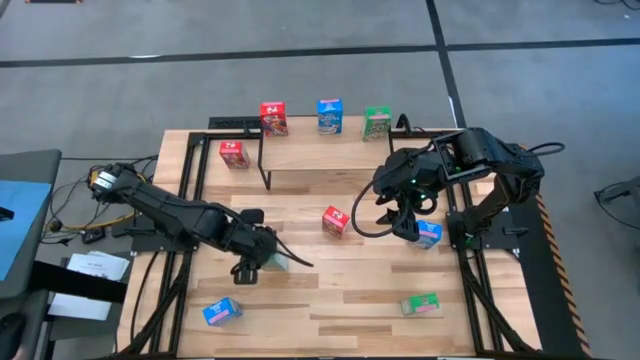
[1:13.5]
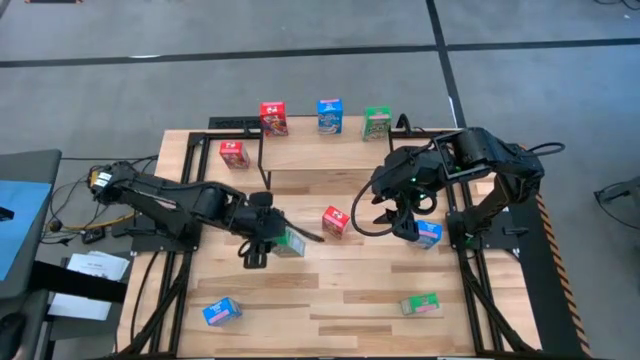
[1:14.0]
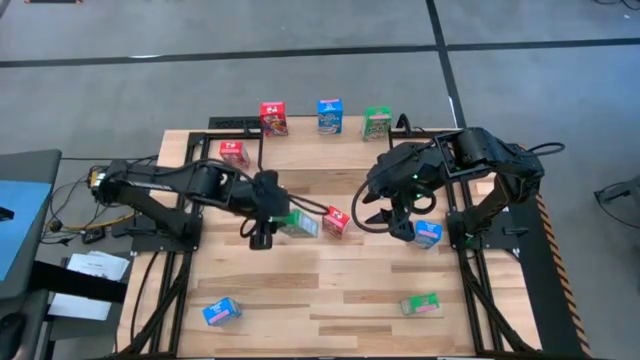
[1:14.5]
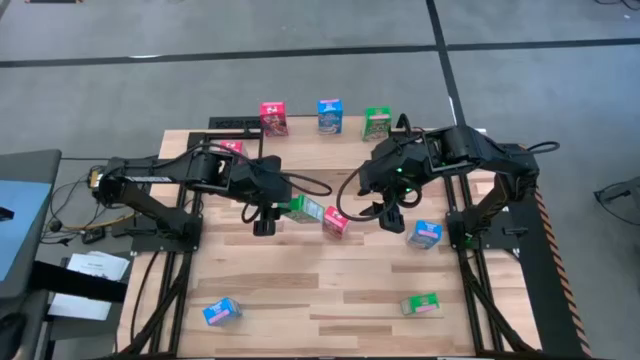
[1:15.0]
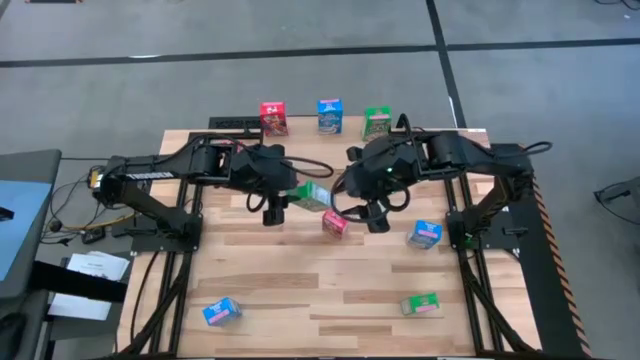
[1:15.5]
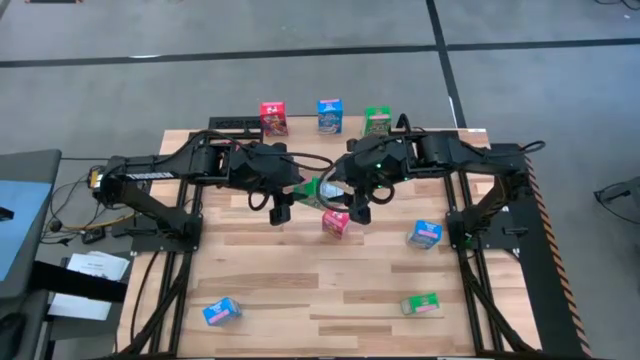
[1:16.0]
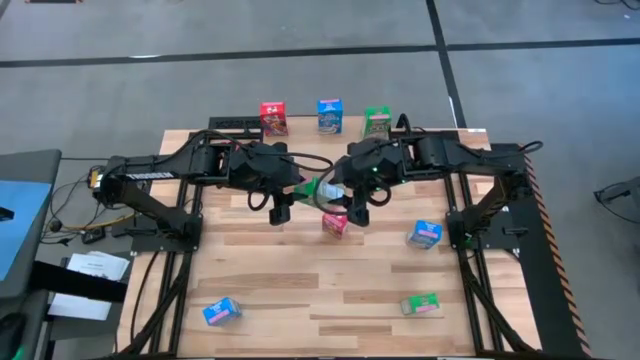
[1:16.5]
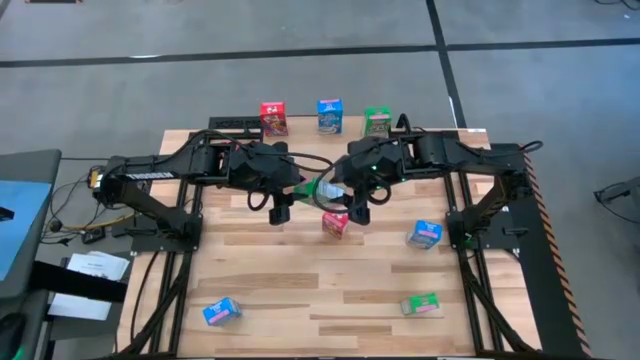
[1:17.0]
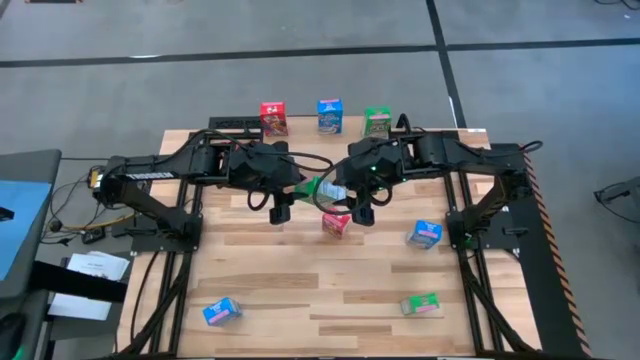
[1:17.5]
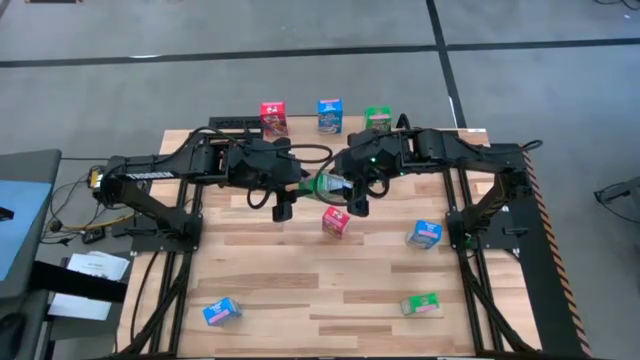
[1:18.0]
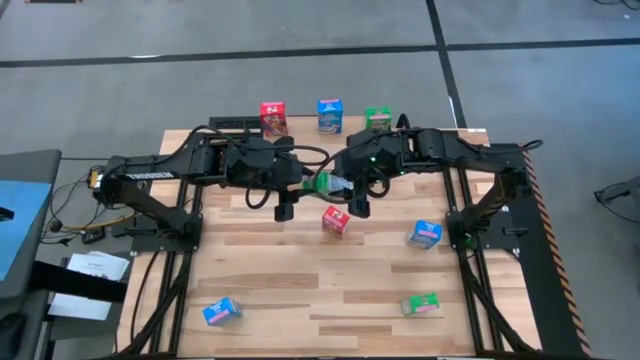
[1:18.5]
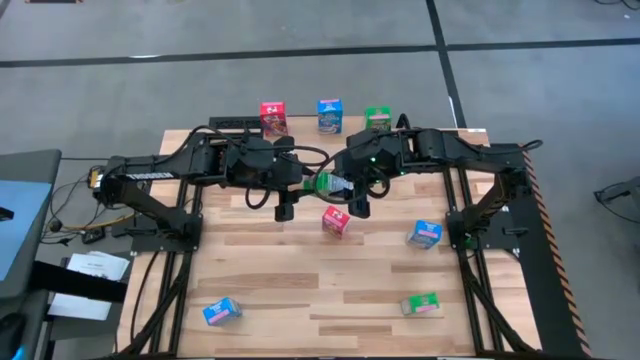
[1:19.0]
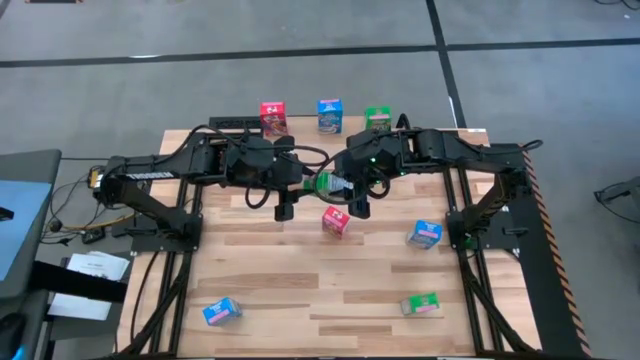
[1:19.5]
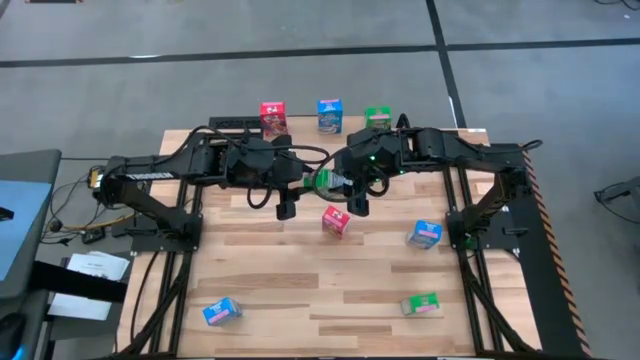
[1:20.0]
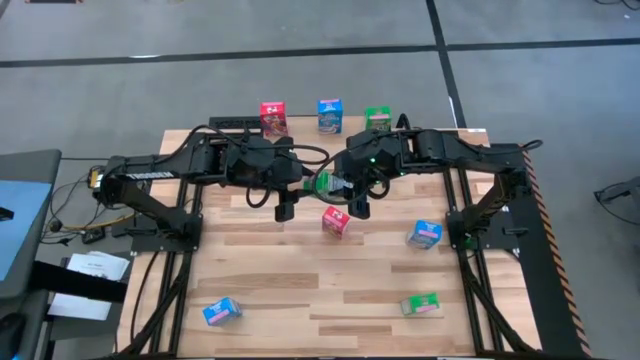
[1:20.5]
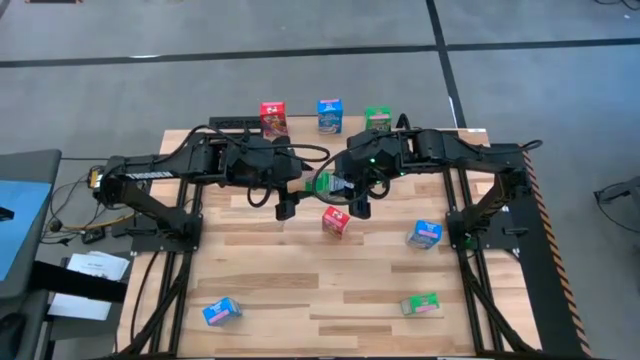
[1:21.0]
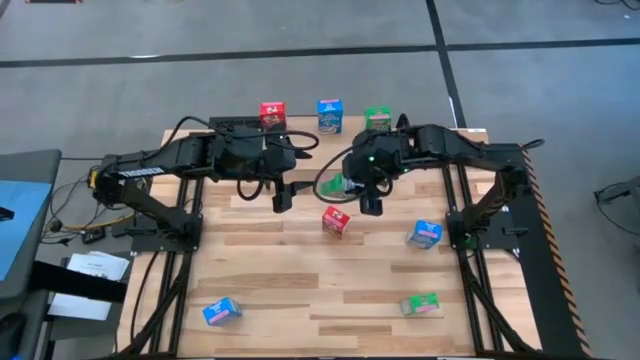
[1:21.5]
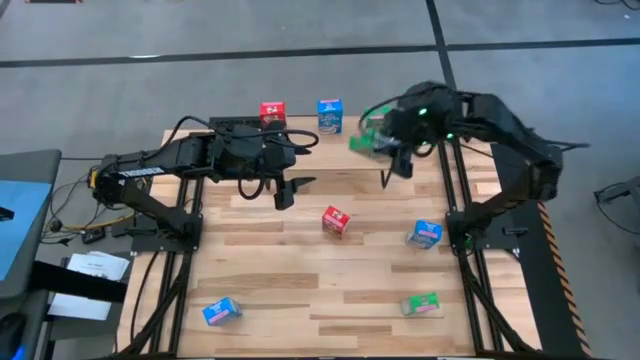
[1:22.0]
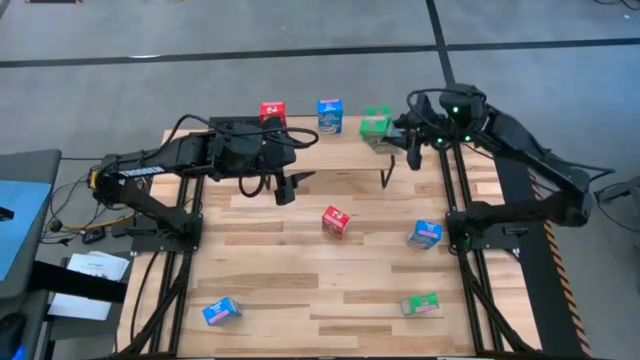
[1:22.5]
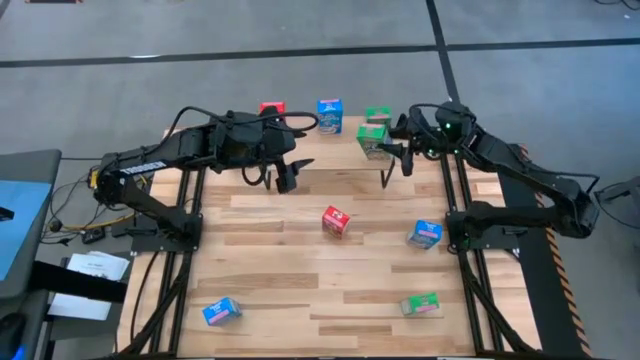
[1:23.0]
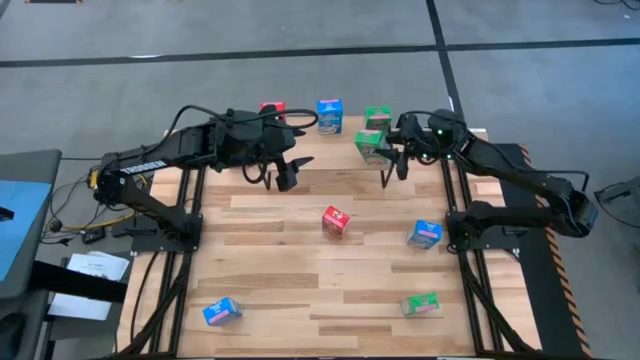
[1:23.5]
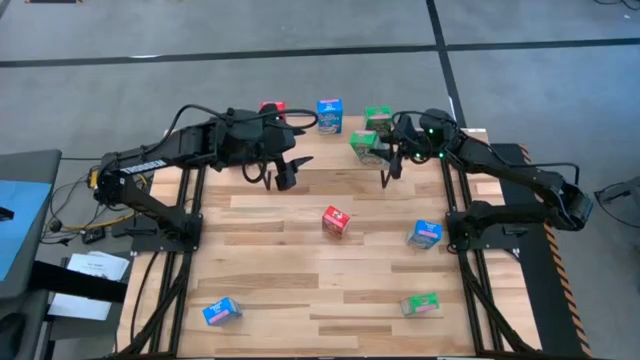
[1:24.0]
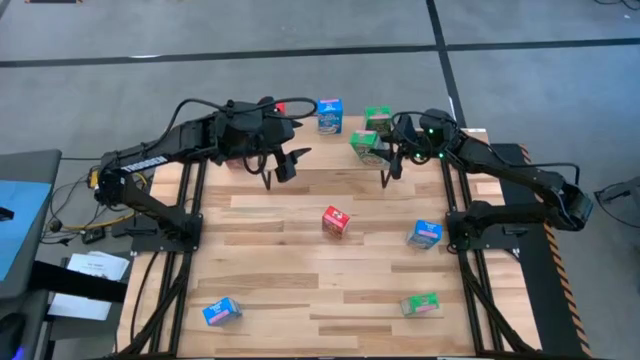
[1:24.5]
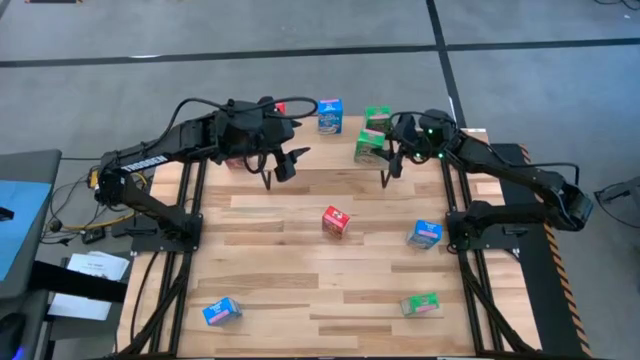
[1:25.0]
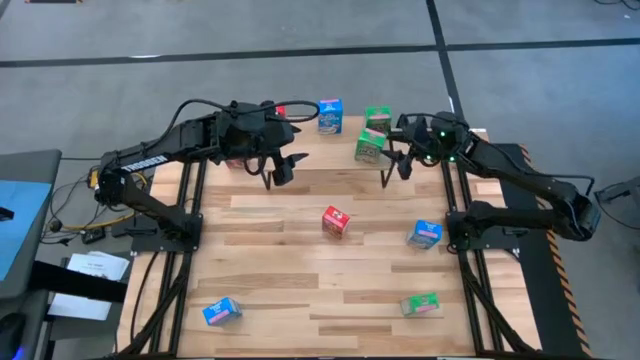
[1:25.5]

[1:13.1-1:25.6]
Task: Stack cereal on shelf
Put the top green cereal box on the shelf aligned with the other green cereal box

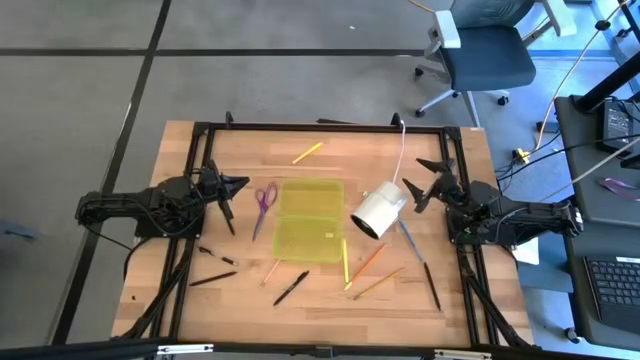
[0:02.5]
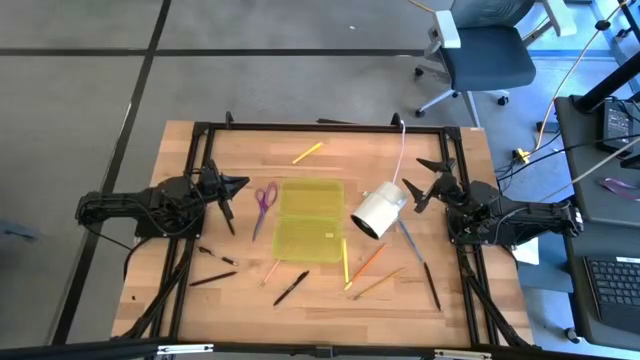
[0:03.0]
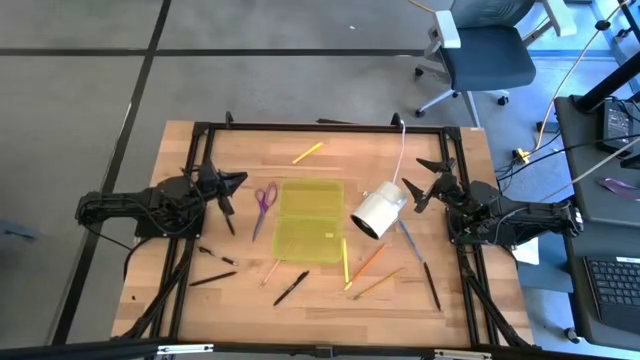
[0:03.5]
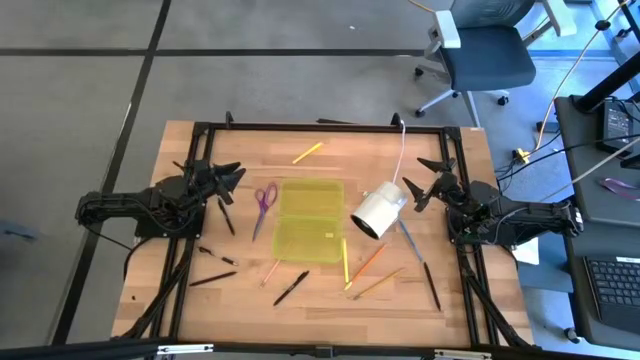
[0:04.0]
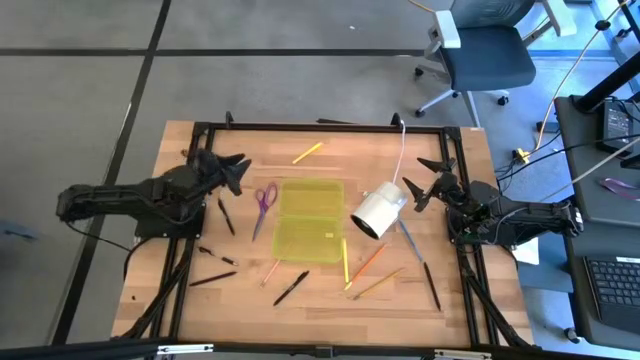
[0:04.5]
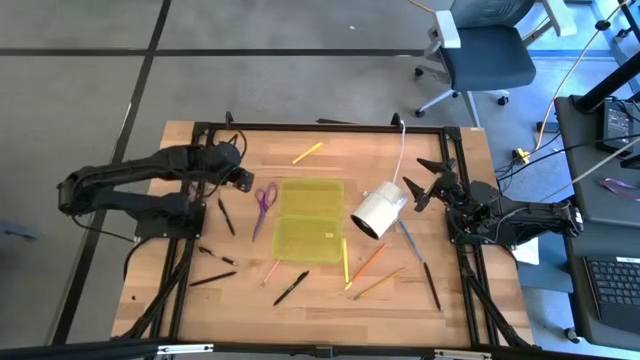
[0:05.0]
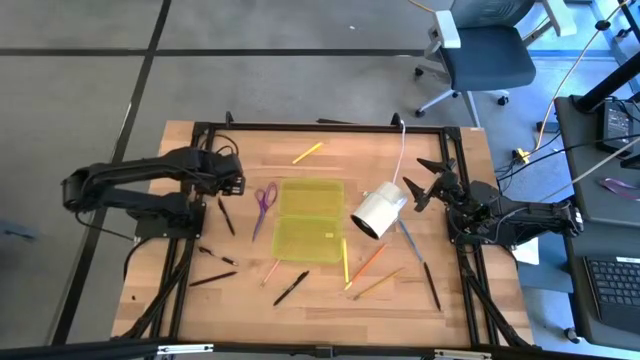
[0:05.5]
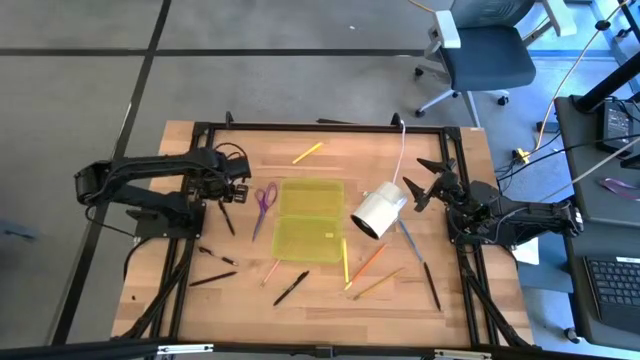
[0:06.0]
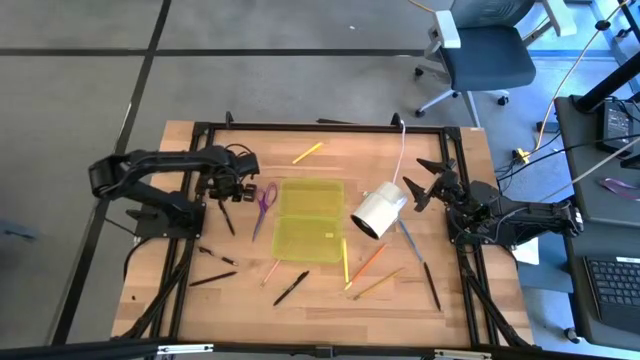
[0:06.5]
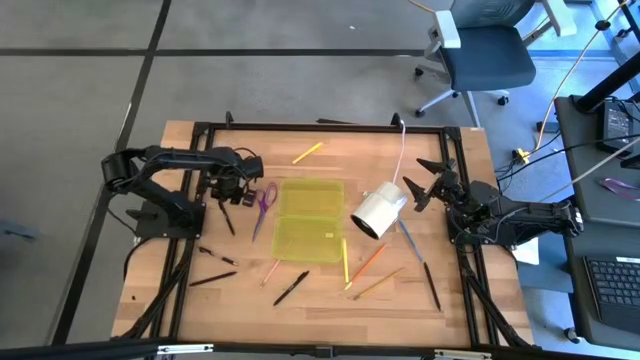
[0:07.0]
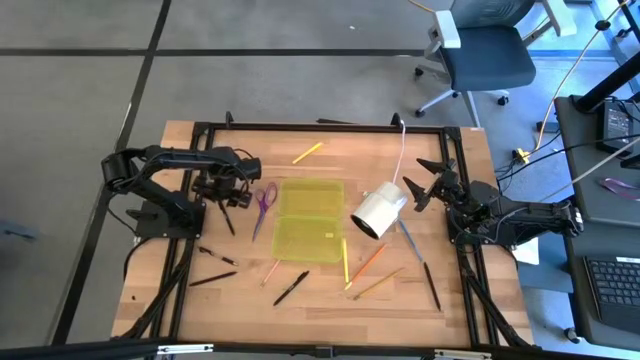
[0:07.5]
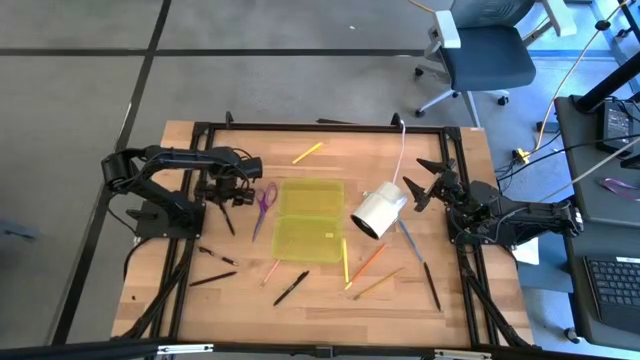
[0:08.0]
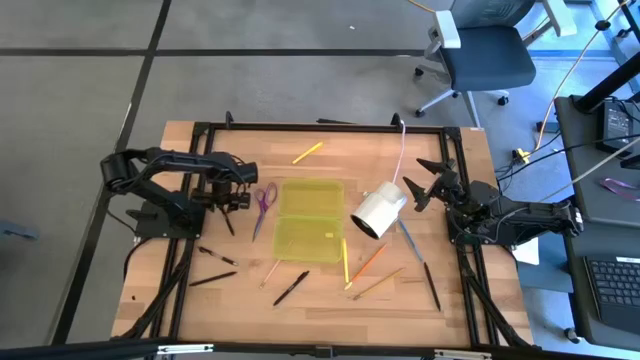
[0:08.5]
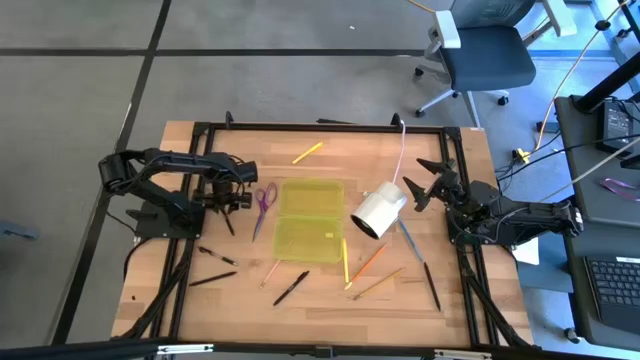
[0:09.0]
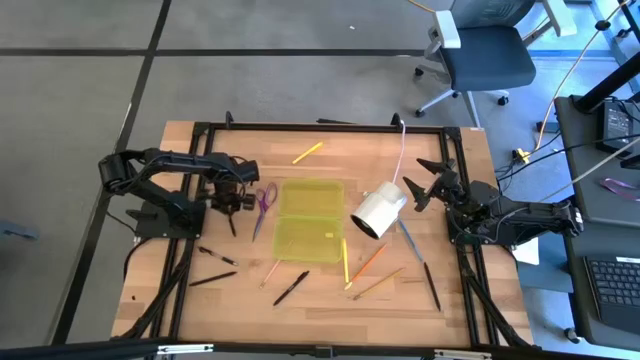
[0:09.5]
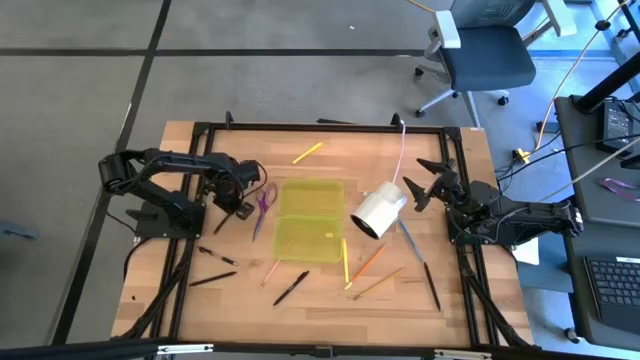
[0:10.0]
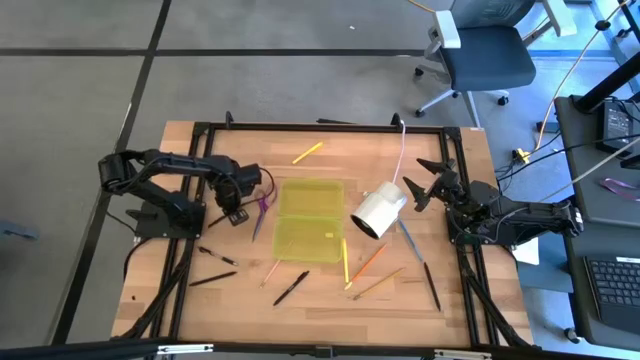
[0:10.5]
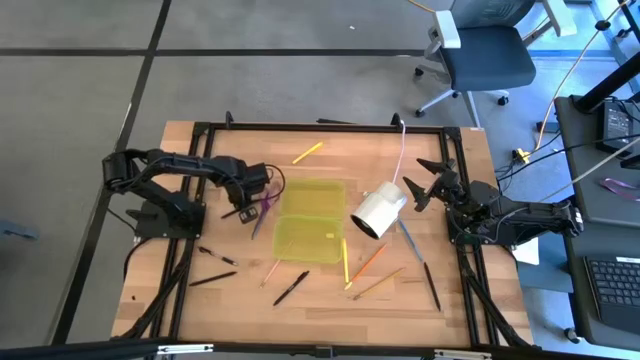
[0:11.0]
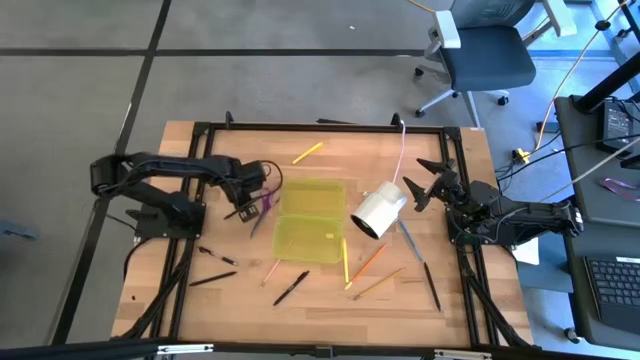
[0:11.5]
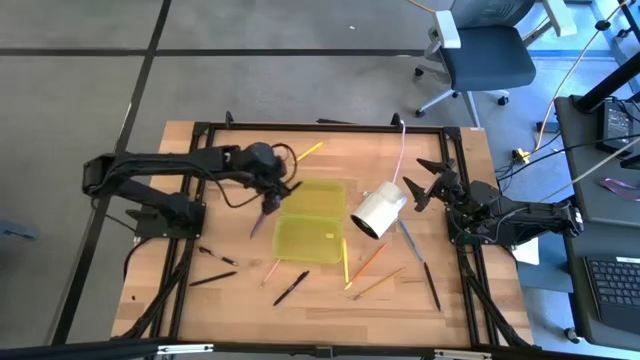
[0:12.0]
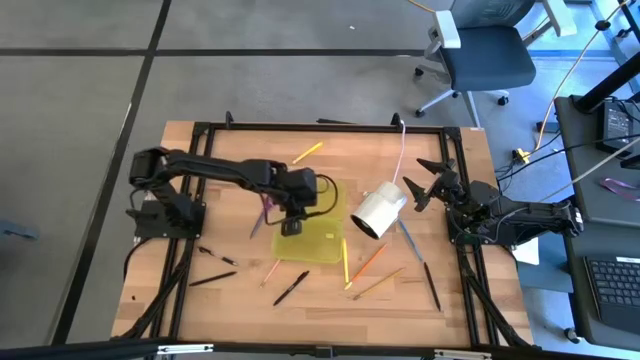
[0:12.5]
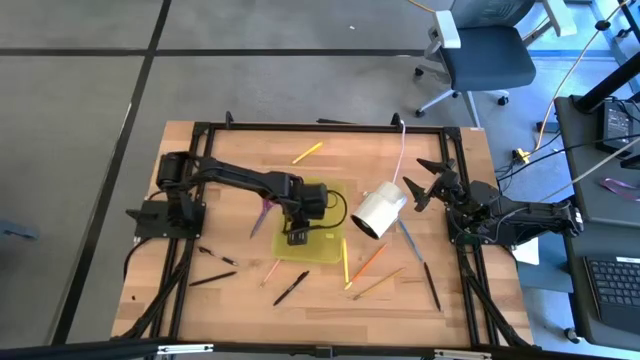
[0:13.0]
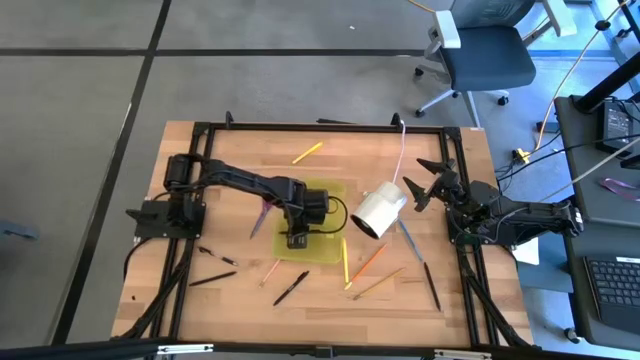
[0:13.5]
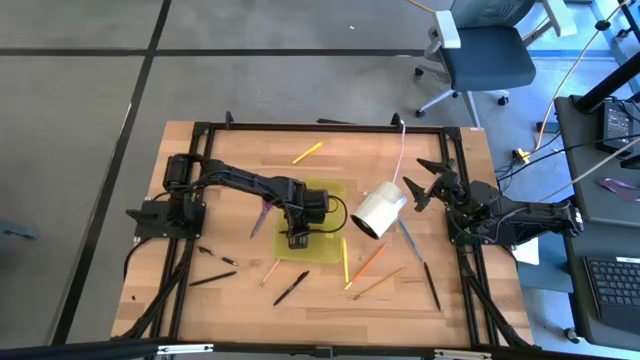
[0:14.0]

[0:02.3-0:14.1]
Task: Pick & place school supplies into a supply box
Put the black pen into the yellow supply box
